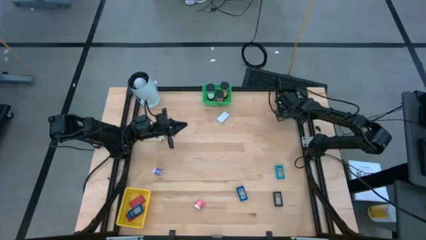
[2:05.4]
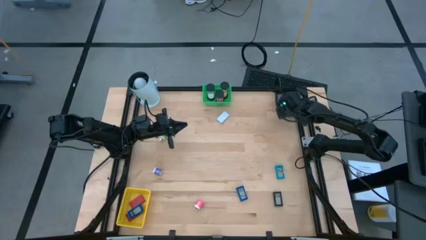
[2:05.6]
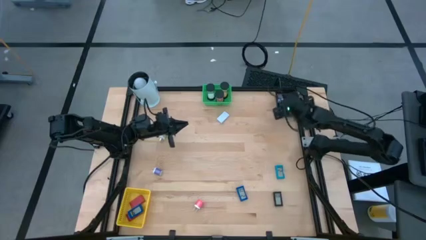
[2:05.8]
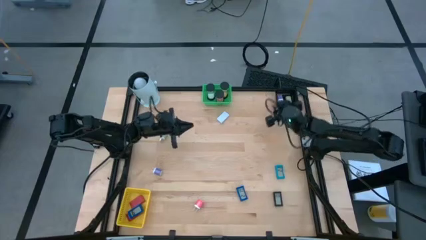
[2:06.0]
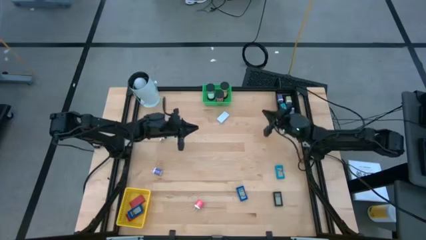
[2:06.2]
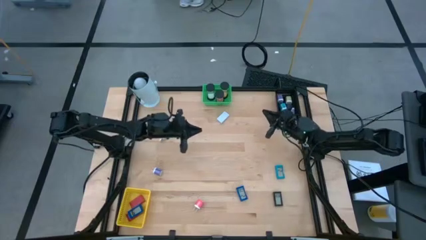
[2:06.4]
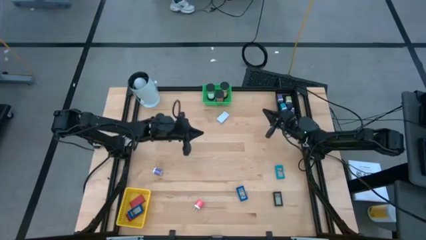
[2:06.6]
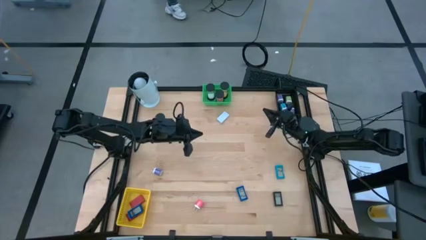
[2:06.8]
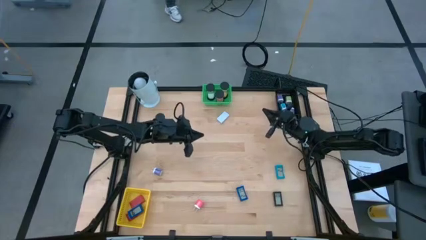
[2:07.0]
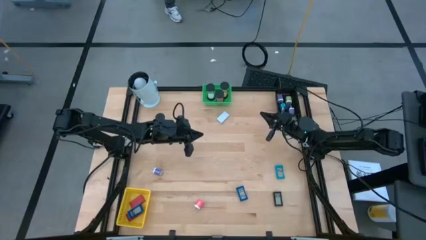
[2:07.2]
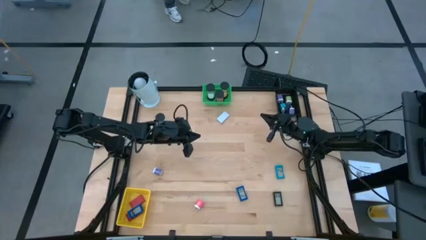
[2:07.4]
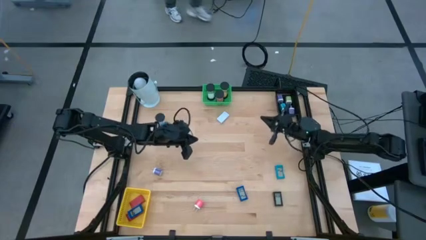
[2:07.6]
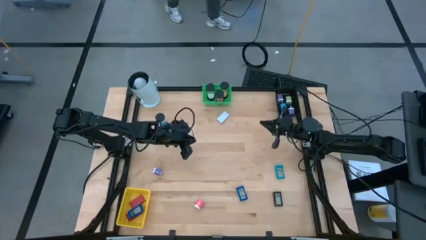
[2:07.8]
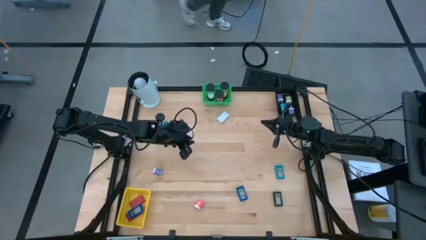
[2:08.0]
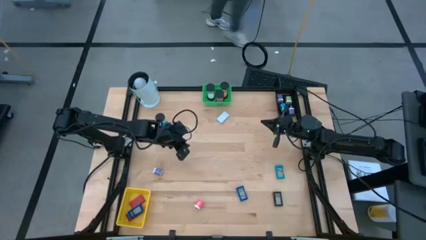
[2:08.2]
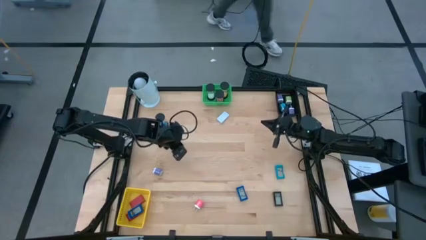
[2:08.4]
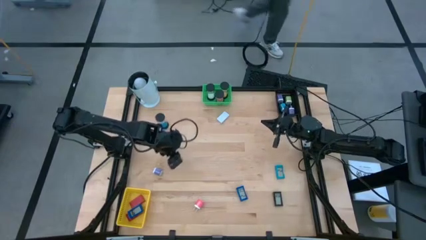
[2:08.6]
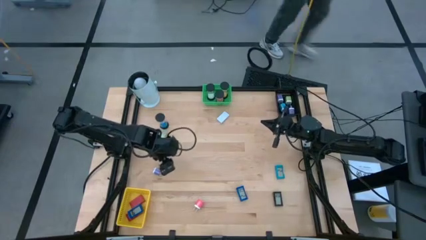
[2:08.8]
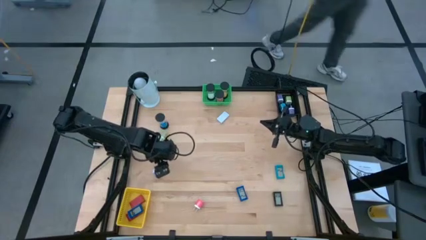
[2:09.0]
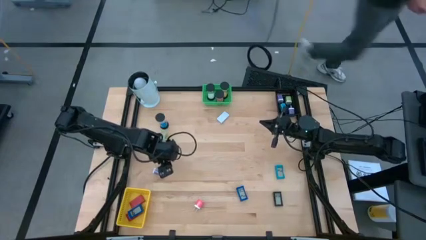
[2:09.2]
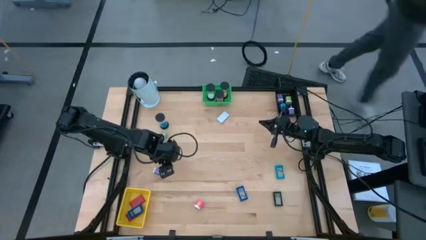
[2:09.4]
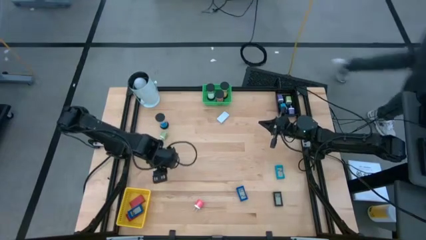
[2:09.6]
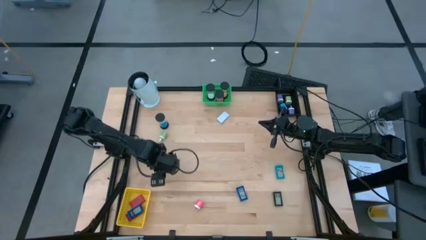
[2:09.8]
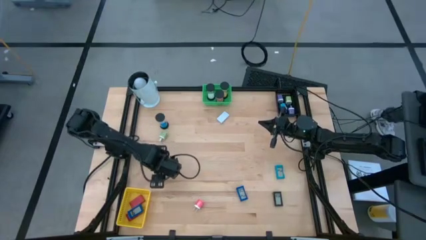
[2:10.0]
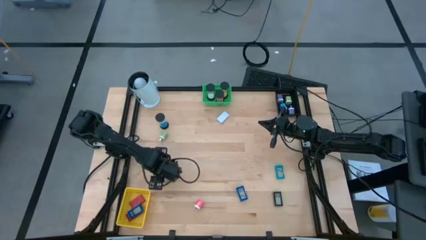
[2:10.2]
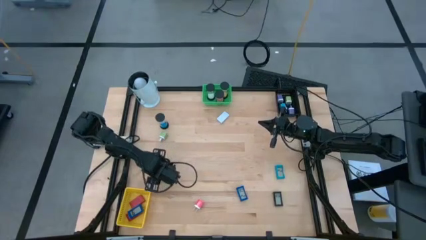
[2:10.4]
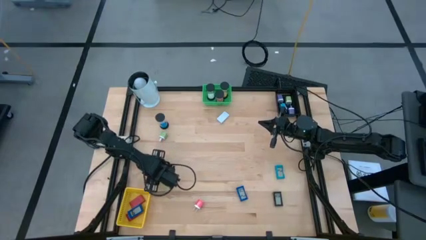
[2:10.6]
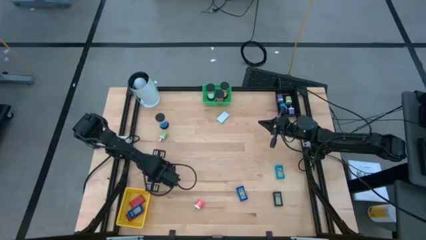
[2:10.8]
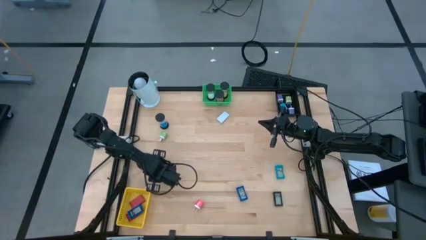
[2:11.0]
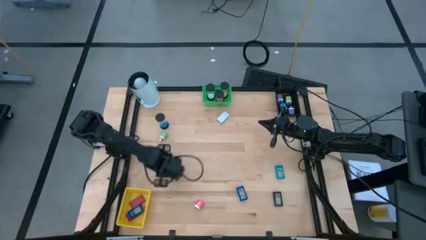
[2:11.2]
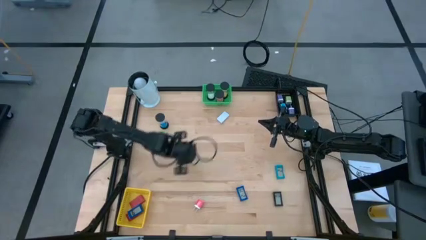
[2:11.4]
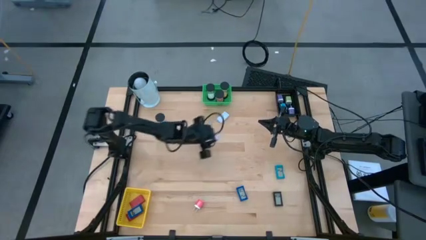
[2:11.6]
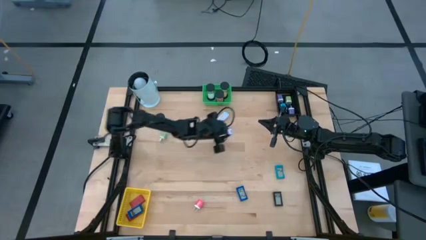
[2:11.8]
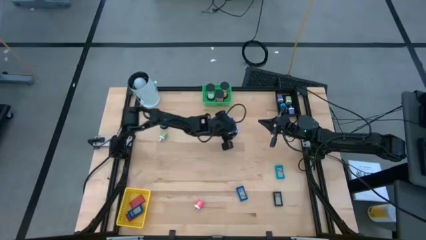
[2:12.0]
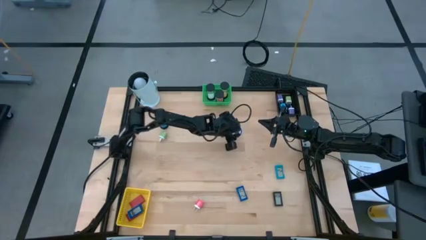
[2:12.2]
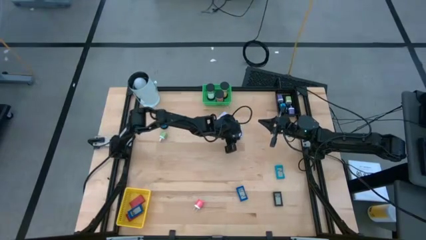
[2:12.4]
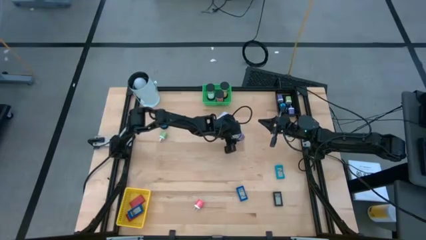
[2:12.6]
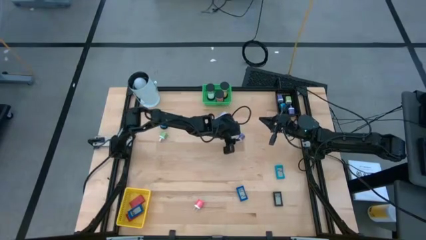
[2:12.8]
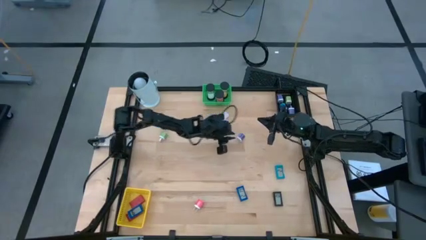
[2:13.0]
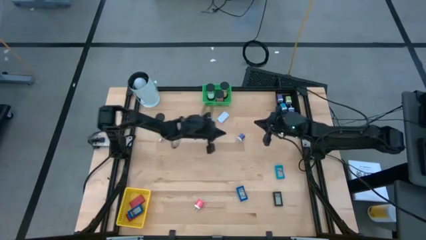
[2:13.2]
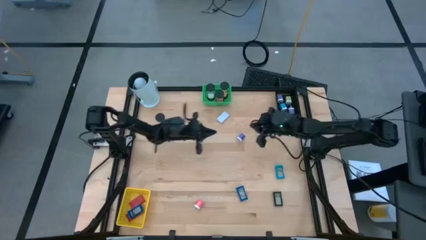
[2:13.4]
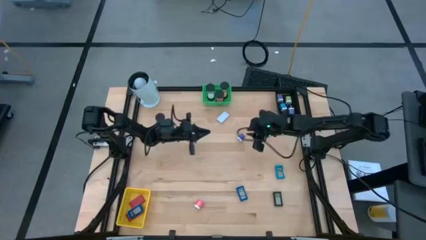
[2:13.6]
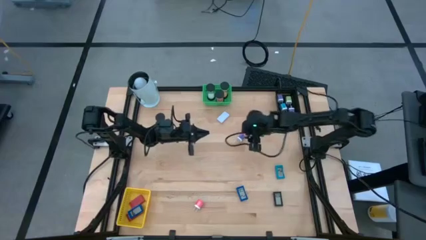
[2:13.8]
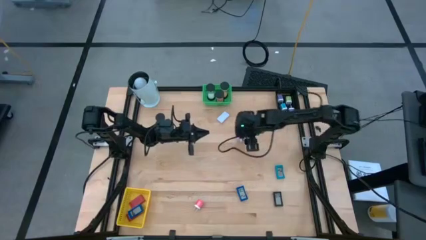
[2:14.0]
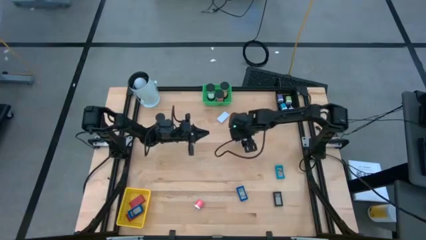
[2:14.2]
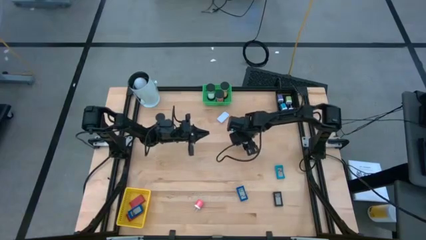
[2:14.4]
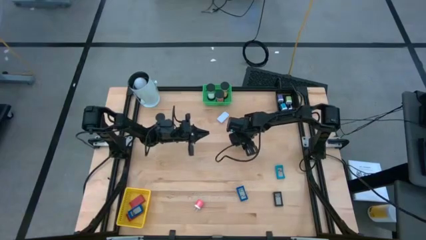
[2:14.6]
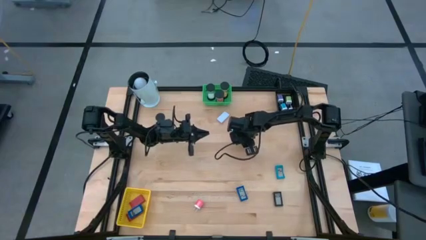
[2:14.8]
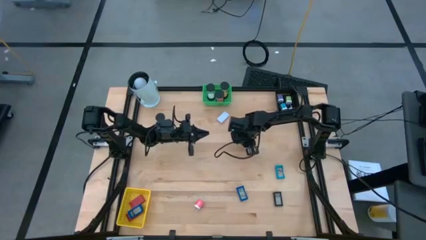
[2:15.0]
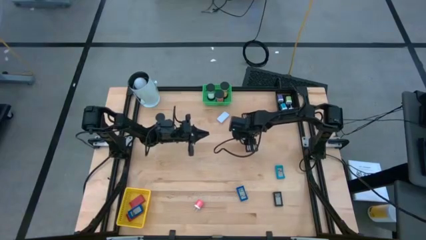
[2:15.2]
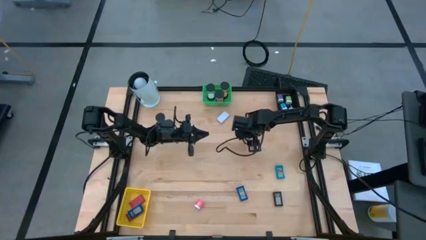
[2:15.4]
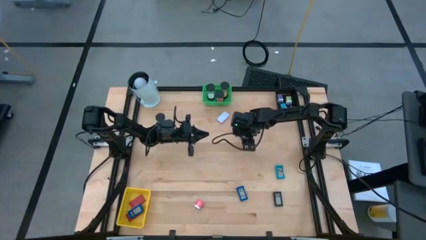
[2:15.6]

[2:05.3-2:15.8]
Task: Pick & Place Office items
Put the purple adapter into the black basket

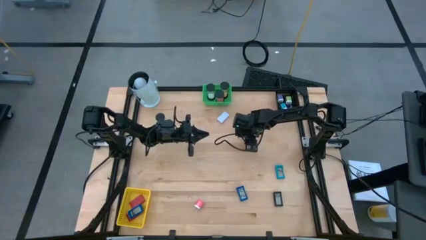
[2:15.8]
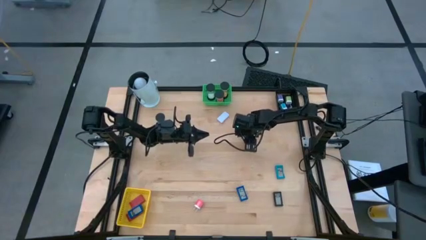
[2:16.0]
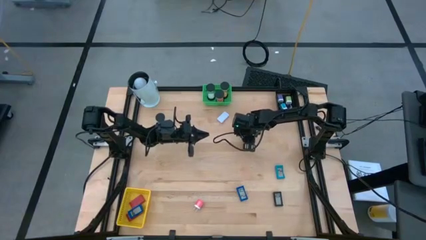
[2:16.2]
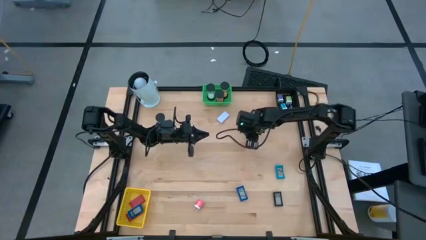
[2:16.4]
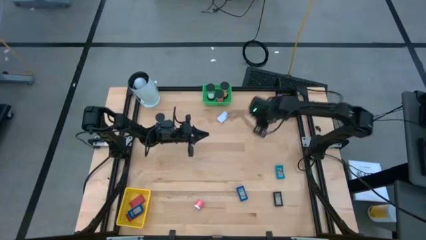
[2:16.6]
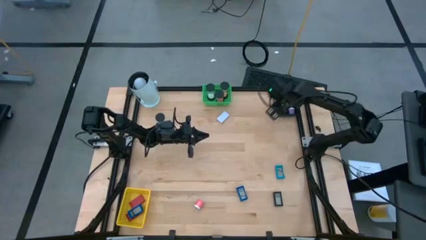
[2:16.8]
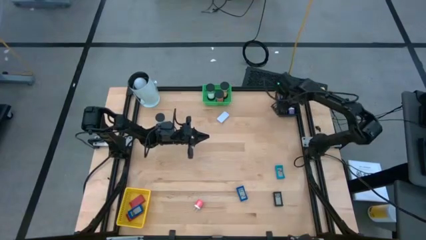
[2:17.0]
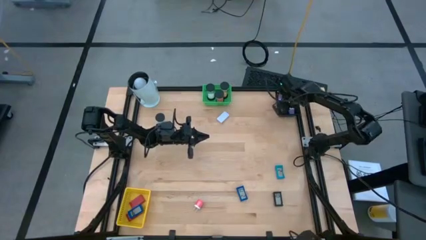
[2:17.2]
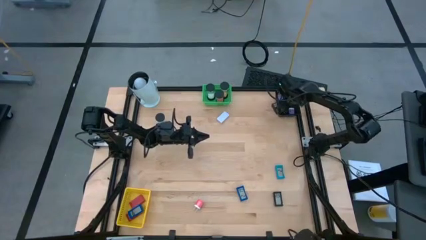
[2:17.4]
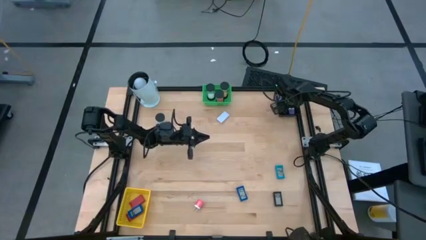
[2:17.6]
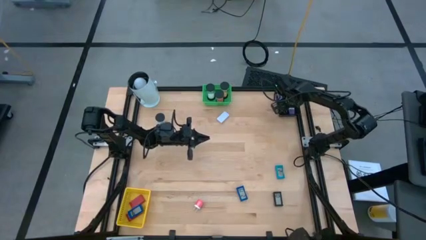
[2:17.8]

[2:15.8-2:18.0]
Put the purple adapter into the black basket

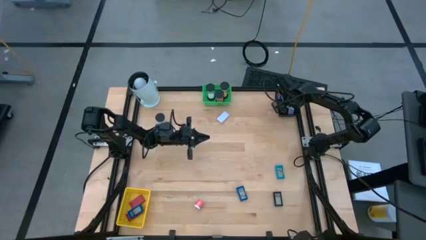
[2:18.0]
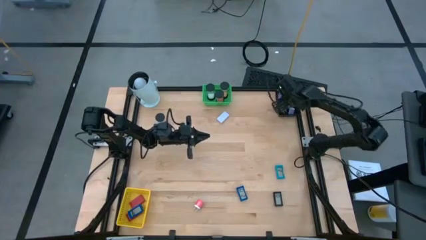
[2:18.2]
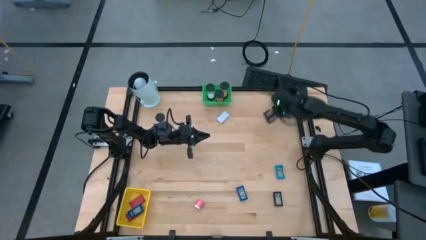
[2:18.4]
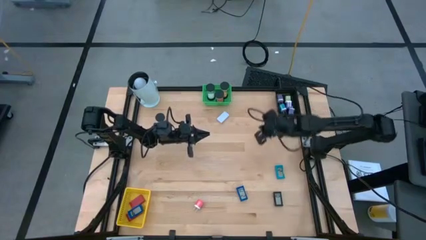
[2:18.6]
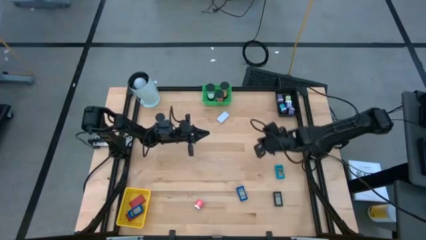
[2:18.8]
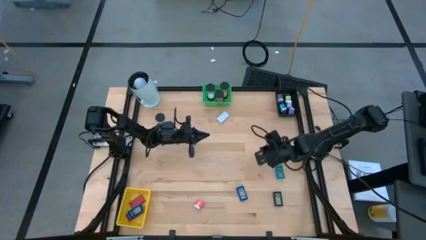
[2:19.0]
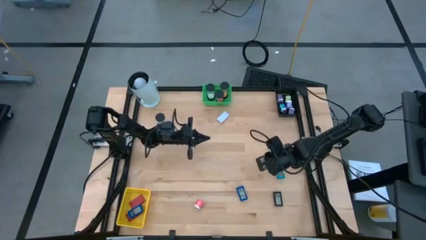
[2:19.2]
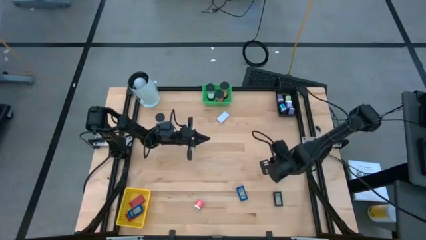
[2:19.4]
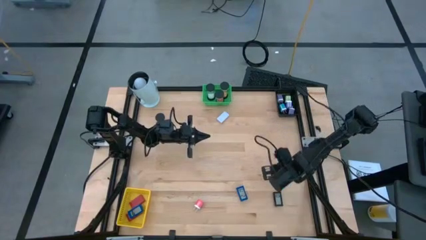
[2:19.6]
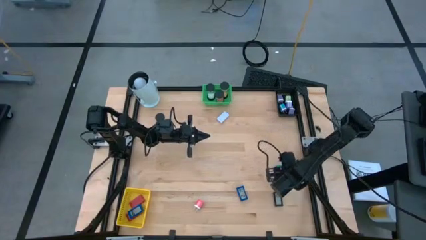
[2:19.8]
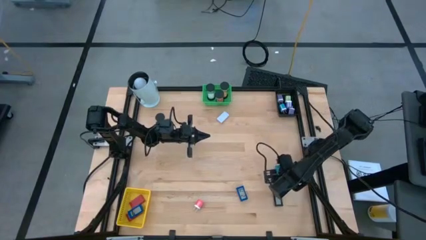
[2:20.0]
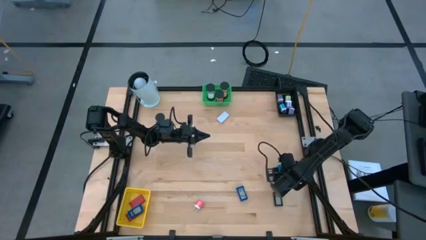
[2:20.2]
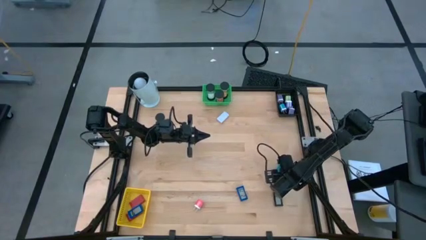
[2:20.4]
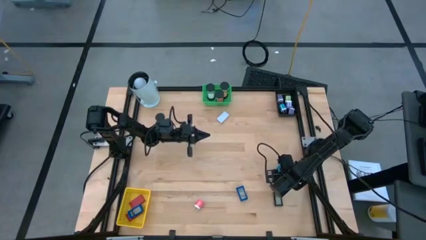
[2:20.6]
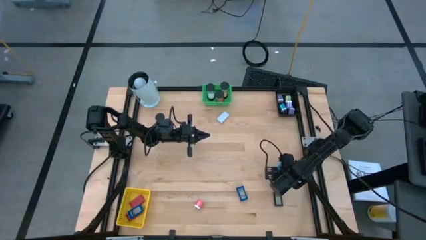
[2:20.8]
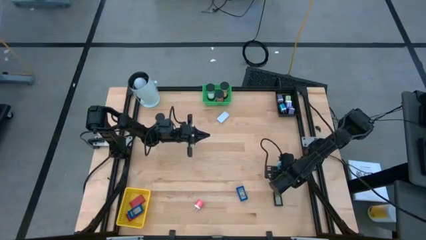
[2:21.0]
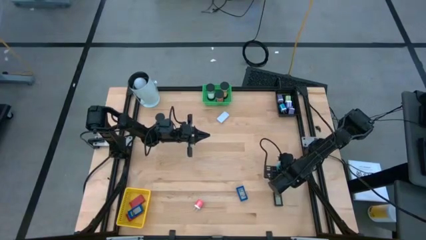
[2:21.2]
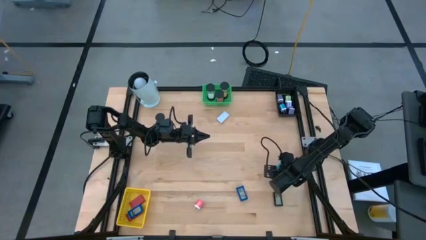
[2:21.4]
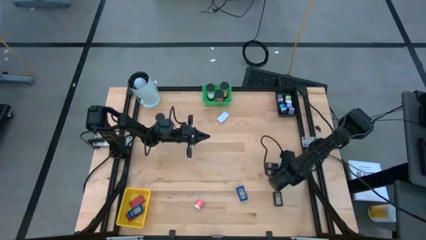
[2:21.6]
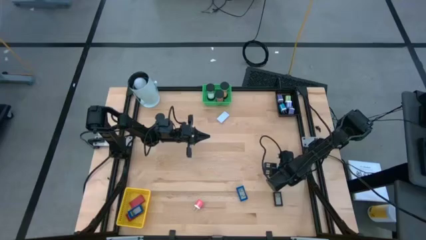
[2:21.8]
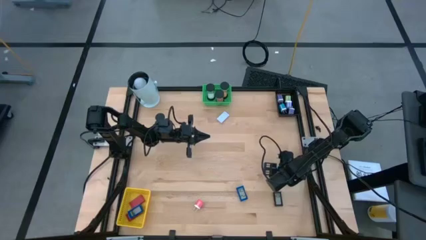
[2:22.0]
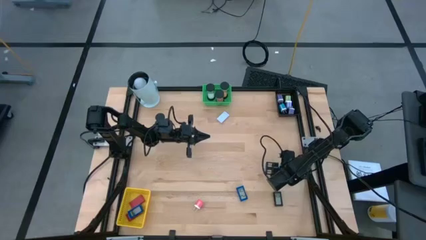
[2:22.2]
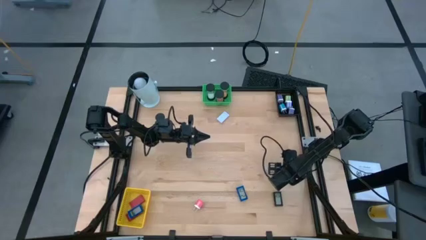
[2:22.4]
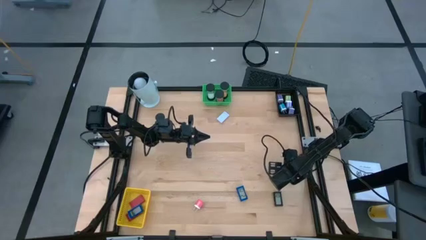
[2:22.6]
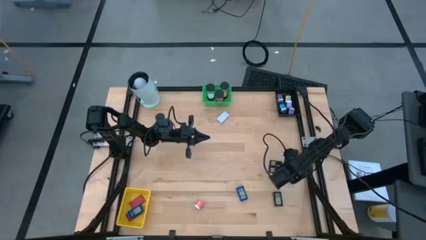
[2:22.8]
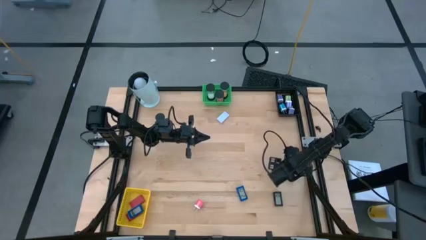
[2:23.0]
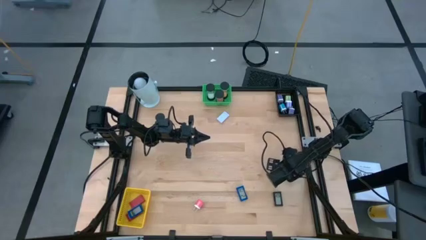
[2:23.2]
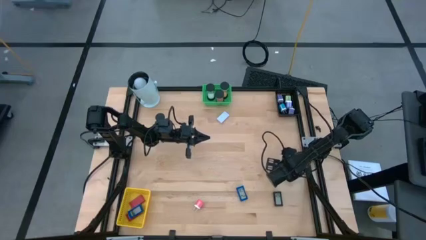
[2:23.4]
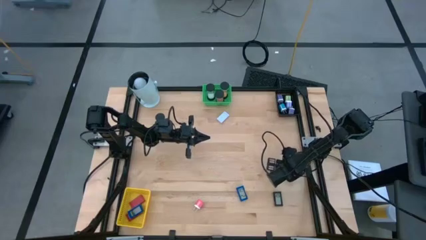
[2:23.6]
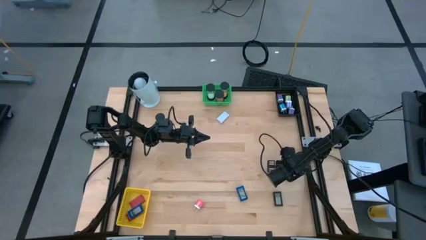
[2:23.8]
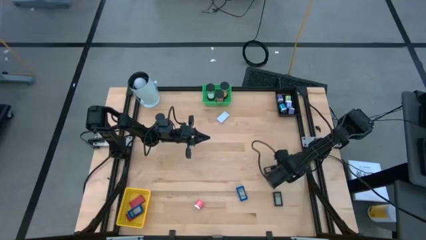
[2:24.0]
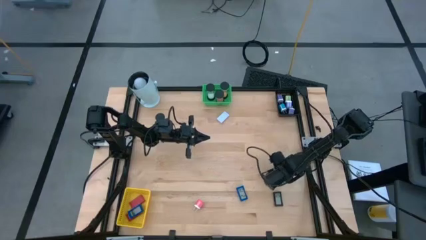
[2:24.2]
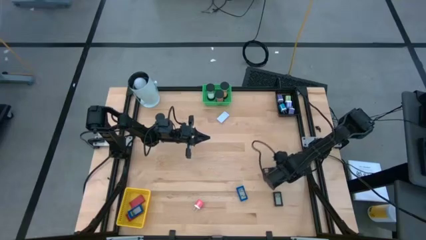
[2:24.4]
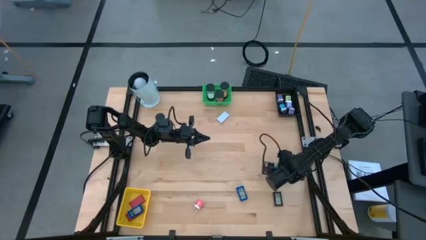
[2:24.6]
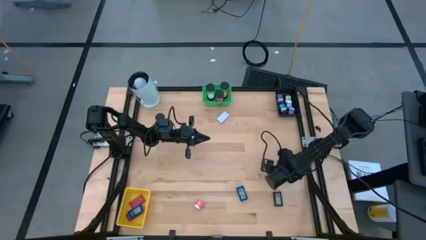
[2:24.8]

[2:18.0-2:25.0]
Put the light blue timer into the yellow basket
